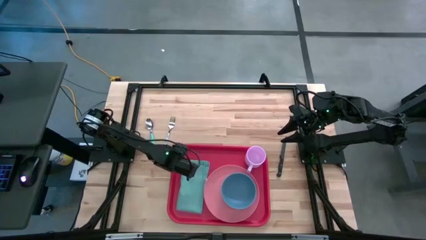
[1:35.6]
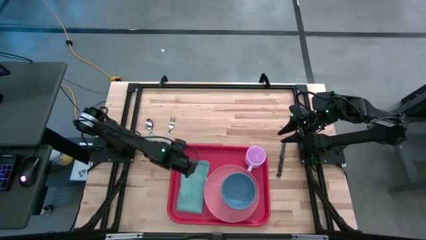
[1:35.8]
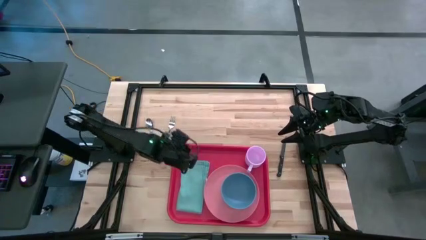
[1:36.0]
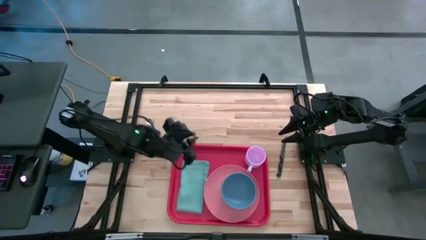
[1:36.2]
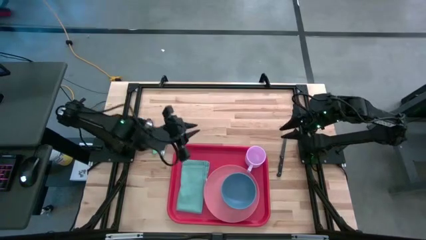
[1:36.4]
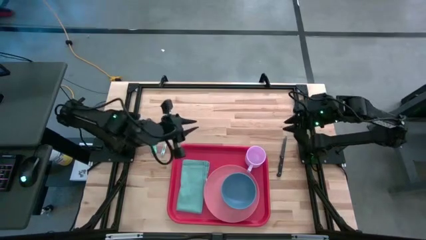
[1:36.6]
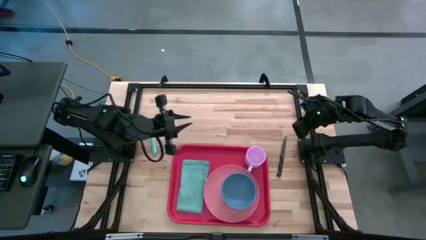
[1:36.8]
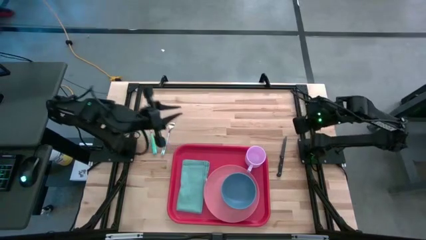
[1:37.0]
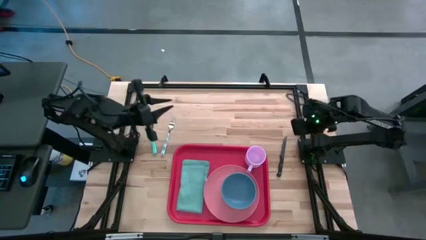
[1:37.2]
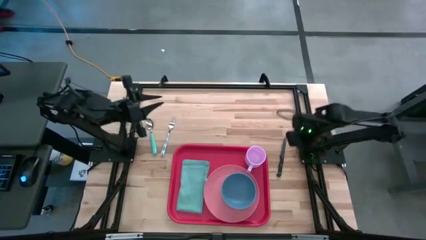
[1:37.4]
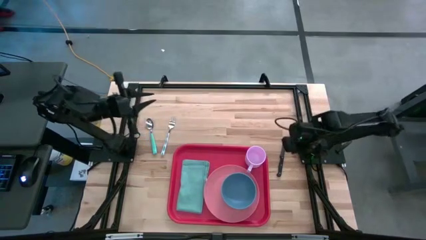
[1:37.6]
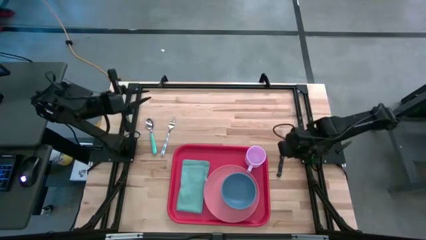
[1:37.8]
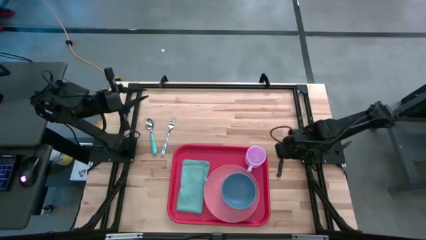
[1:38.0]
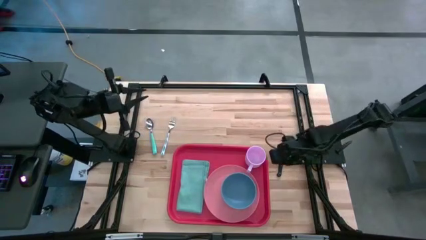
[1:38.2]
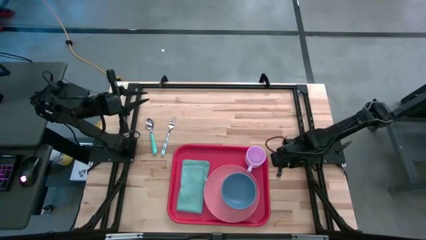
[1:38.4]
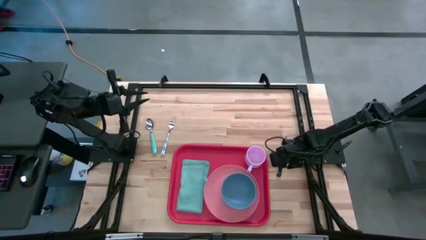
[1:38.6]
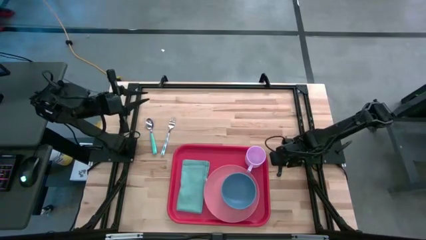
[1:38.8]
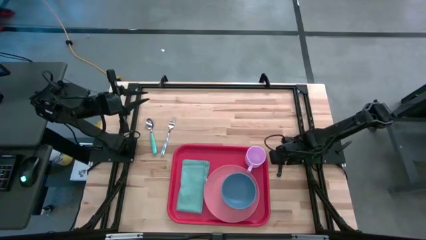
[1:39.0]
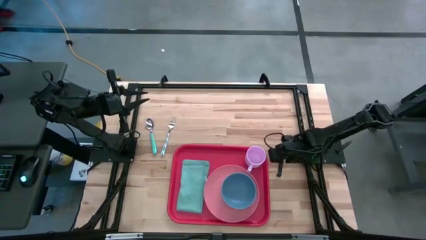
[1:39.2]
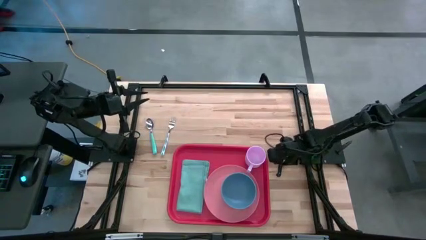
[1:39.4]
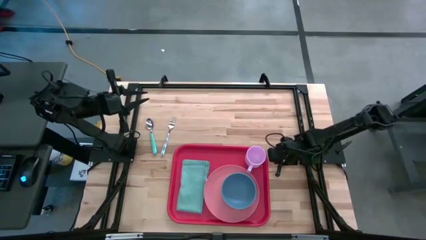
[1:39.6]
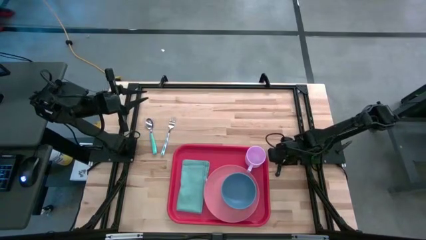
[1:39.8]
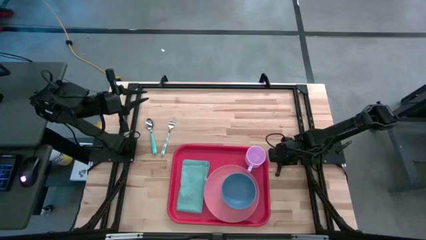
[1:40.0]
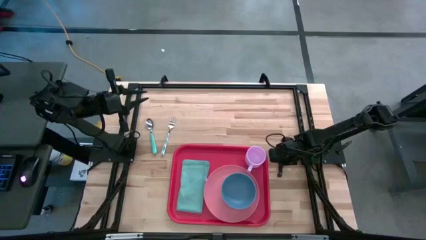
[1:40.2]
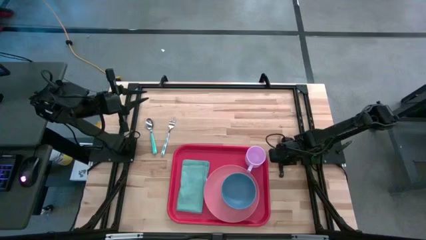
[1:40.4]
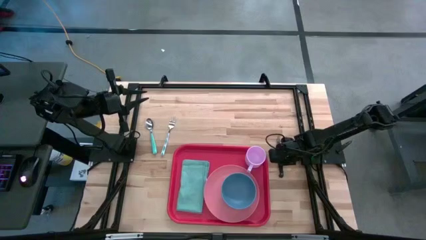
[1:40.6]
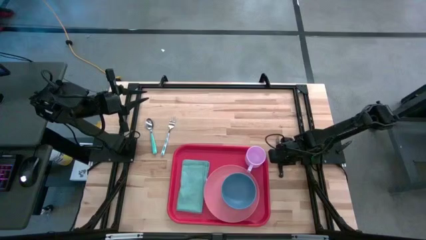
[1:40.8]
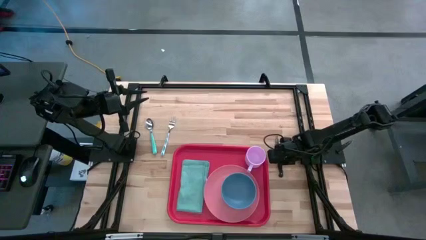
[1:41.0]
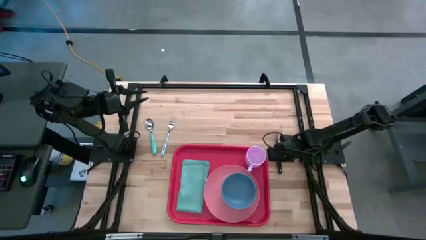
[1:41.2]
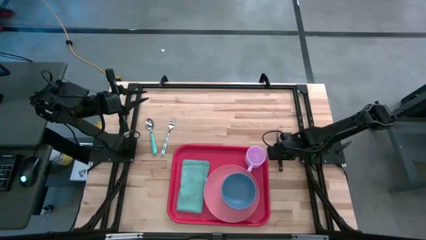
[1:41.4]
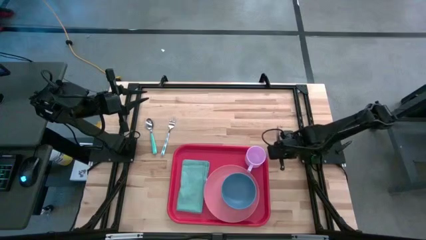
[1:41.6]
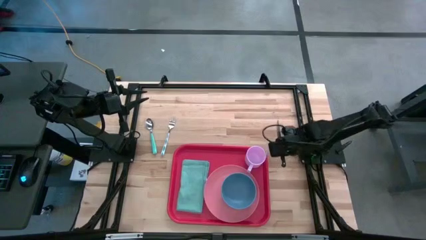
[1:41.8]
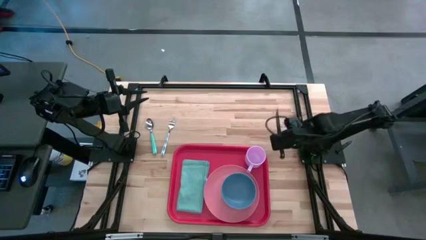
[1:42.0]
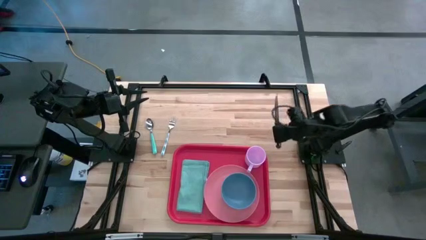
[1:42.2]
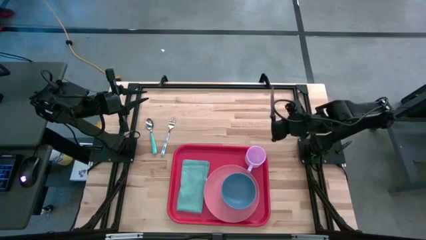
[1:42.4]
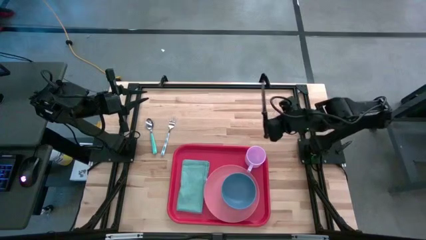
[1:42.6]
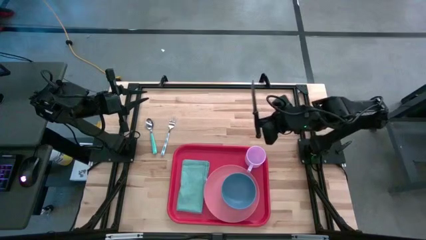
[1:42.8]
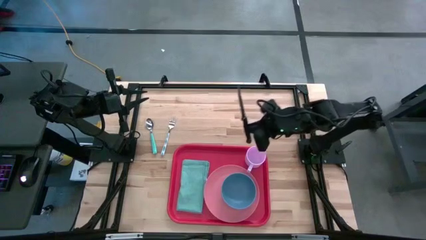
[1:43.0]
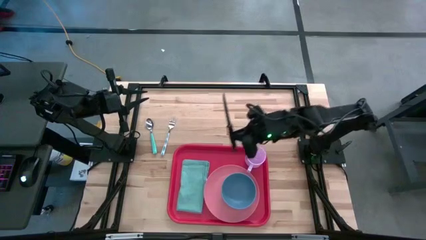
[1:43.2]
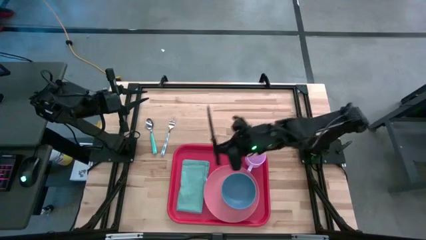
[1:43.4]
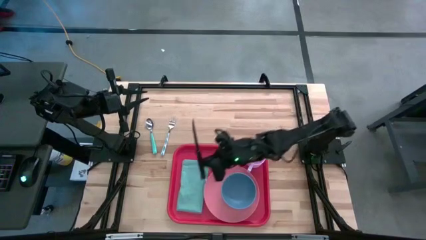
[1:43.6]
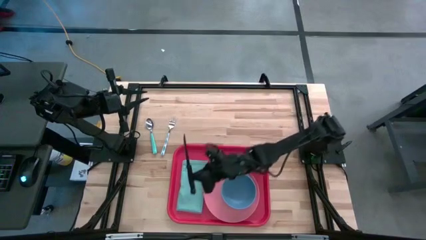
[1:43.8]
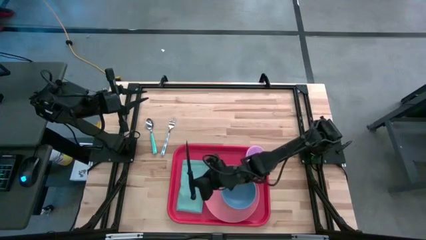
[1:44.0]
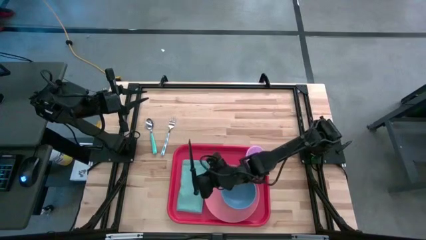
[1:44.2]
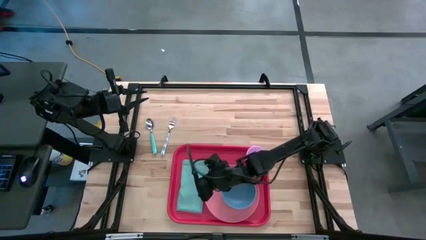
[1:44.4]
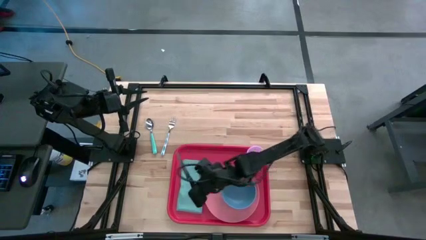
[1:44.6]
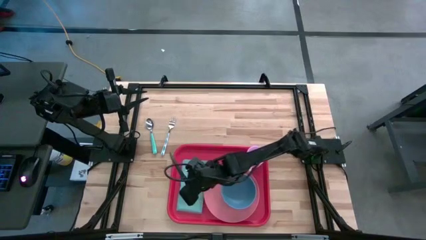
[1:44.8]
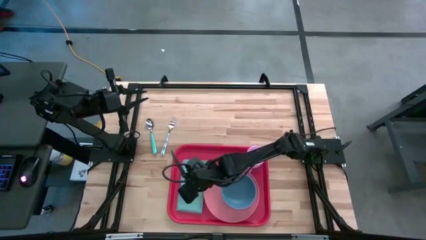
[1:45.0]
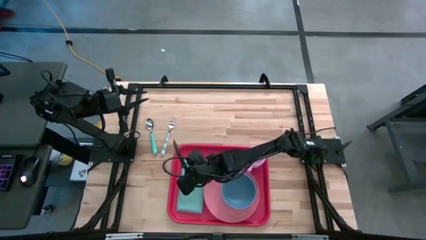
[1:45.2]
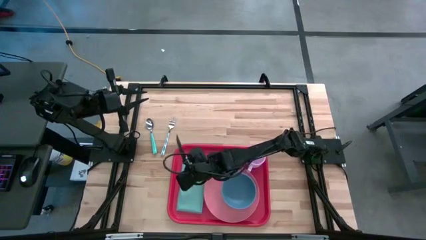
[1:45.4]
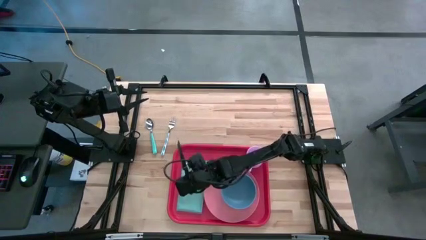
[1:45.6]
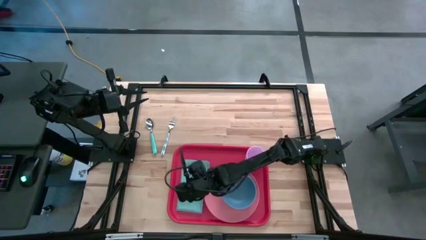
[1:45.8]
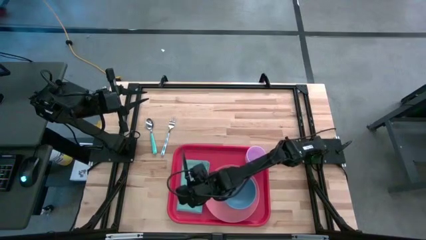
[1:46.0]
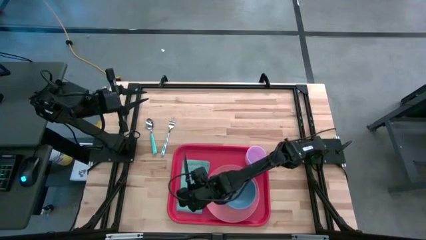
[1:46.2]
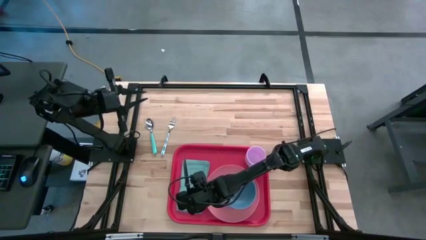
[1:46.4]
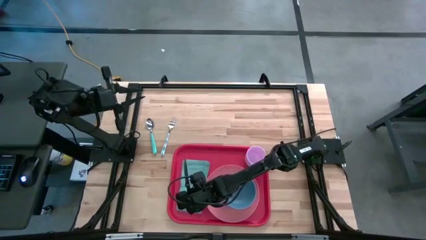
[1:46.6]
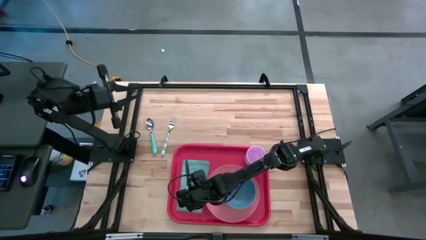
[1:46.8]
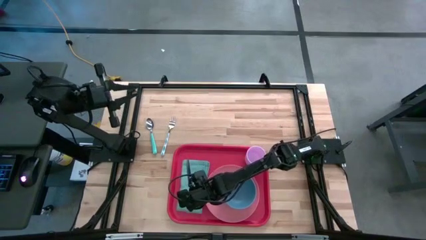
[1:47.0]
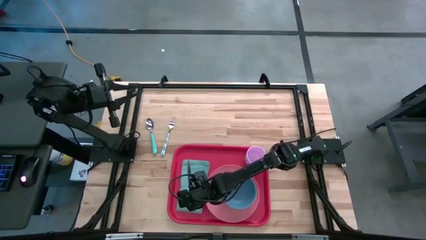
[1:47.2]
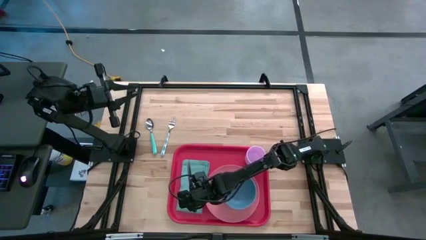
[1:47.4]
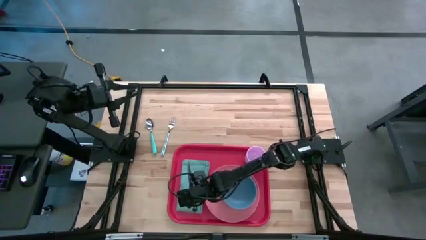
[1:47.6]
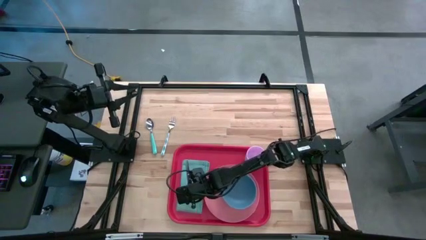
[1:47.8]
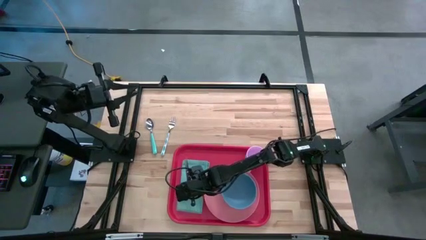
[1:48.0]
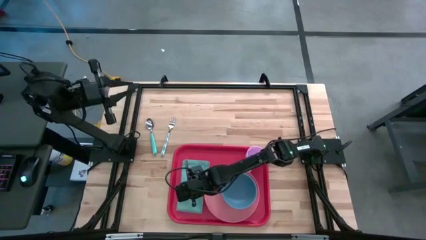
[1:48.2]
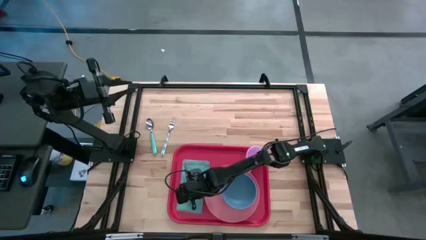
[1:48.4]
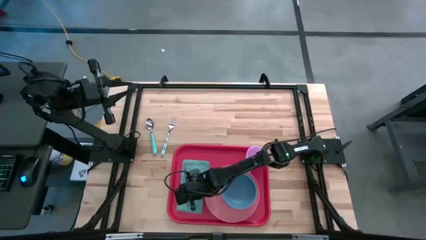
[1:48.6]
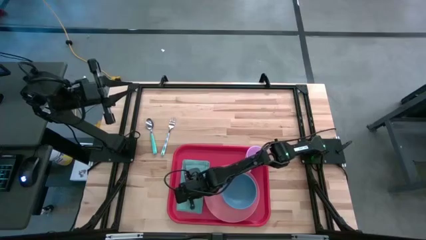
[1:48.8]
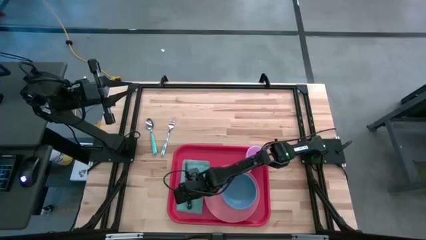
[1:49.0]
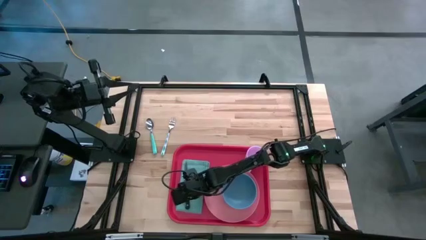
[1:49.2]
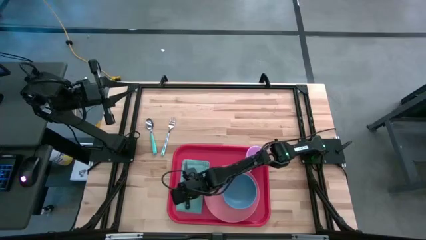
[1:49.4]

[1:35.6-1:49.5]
Task: Set up tray
Put the black knife on top of the blue napkin to the left of the pink plate

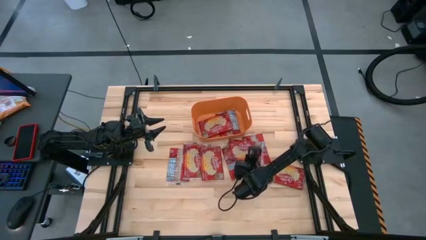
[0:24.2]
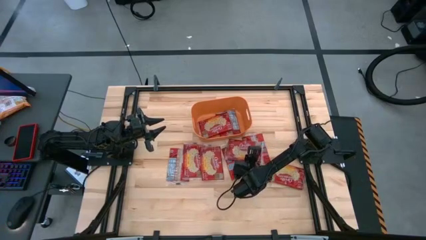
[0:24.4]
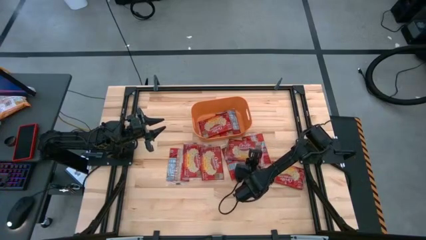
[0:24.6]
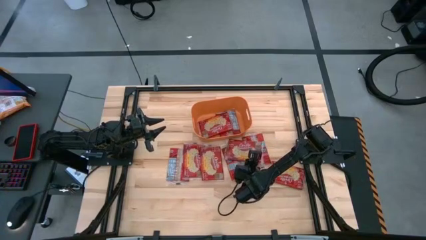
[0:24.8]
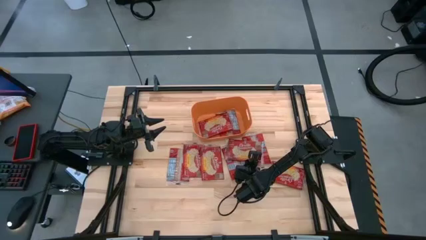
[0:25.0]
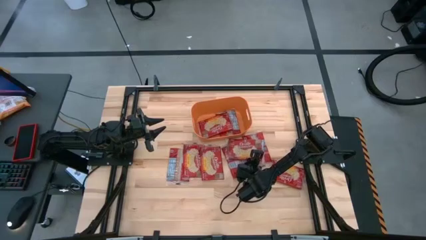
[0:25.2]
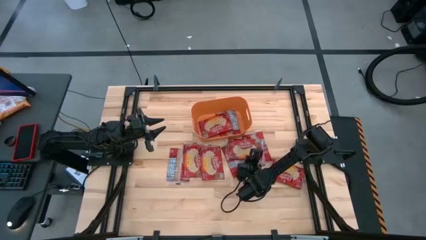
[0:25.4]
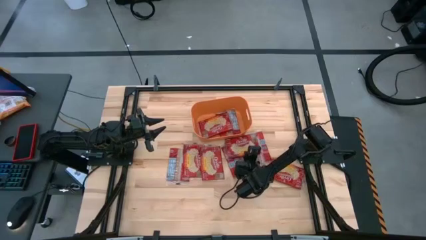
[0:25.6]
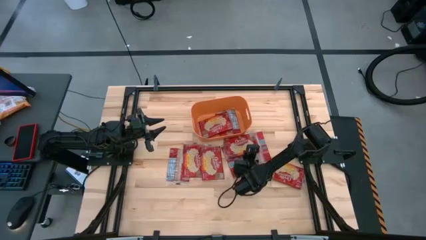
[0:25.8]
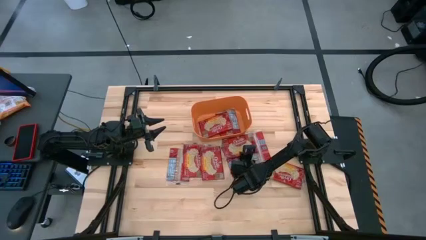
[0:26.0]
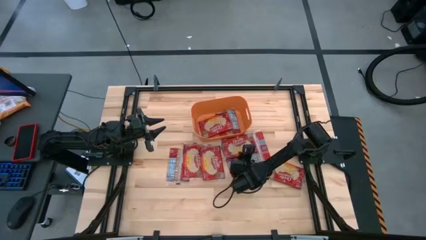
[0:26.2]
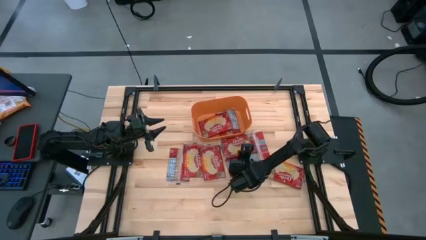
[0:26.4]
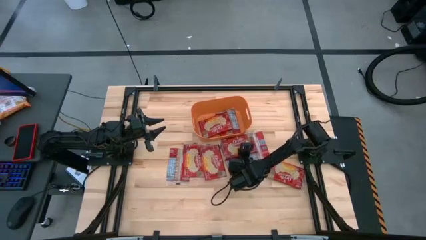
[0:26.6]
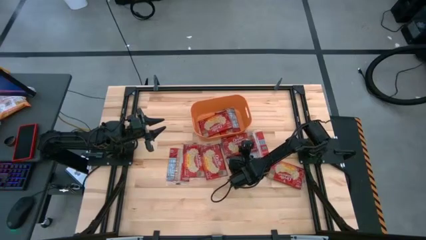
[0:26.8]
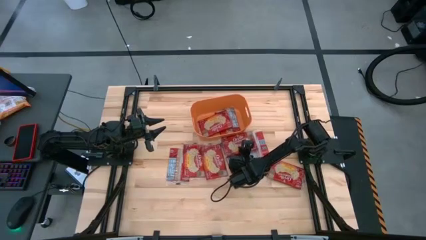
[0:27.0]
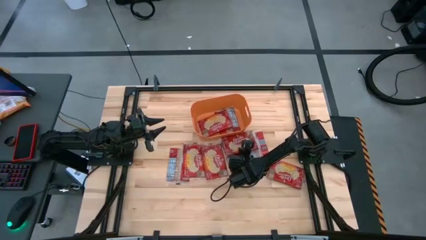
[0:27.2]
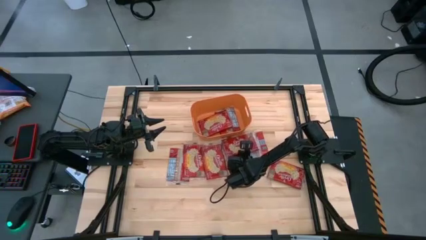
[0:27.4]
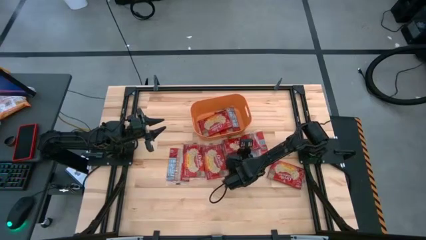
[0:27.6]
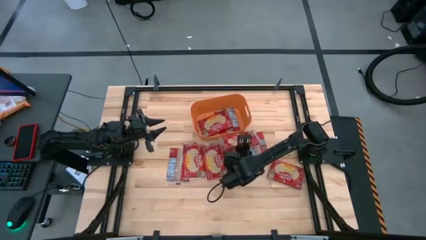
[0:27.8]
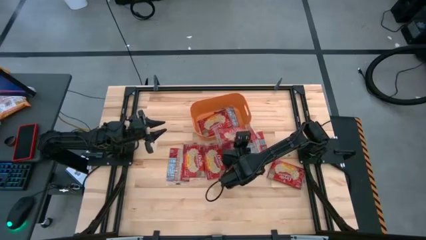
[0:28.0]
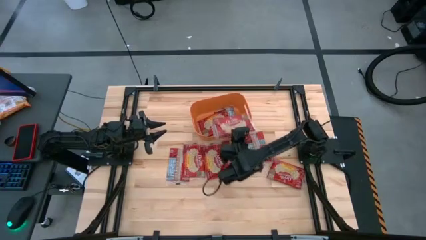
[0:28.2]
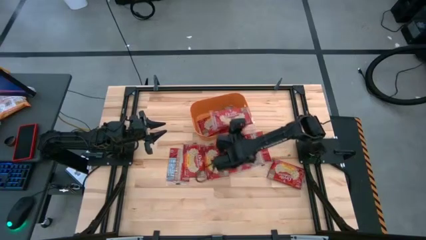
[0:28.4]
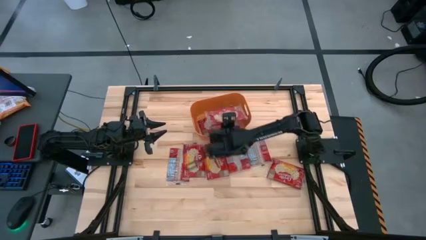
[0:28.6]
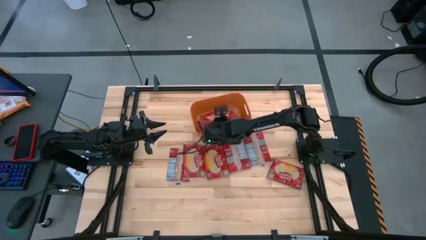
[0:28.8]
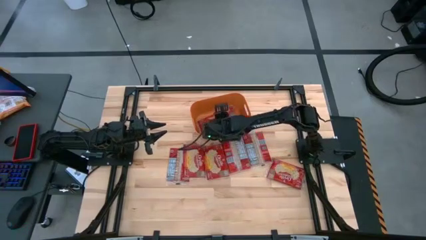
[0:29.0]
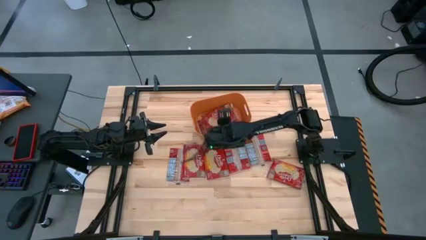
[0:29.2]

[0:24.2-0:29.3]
Task: Sort popcorn bags into baskets
Put the red popcorn bag into the orange bin
